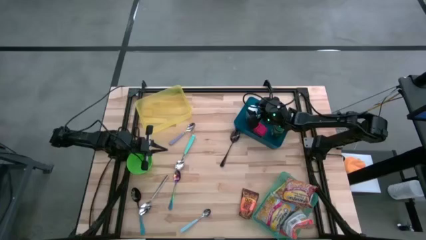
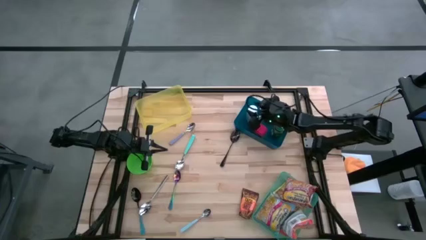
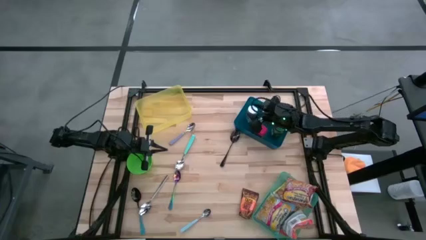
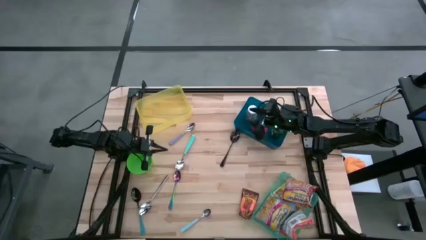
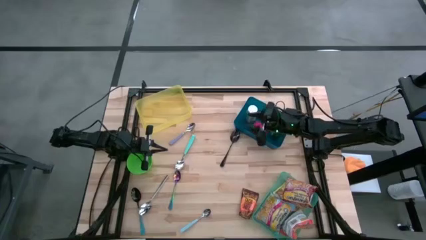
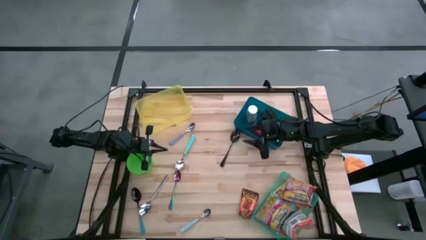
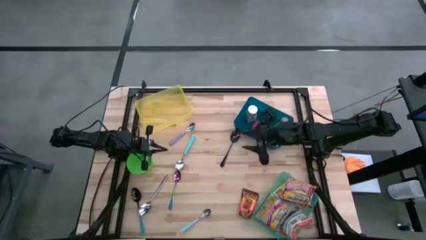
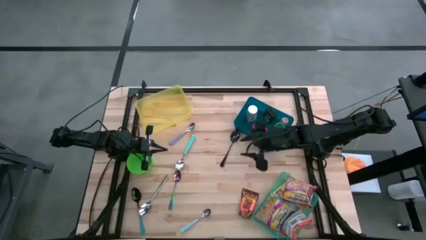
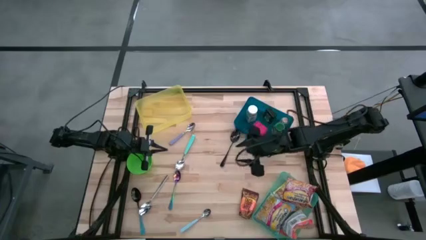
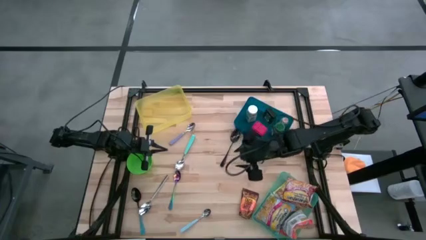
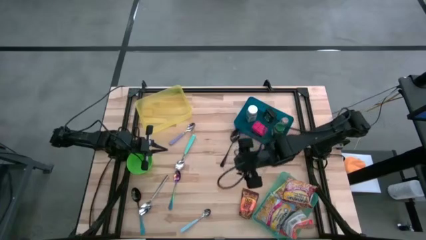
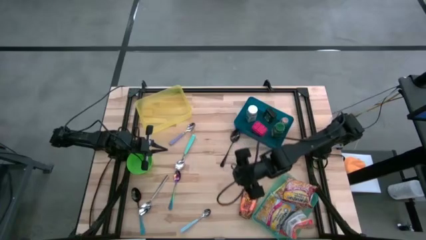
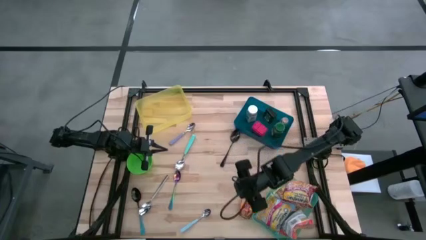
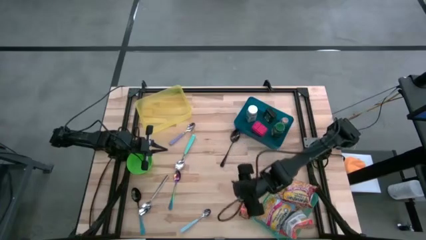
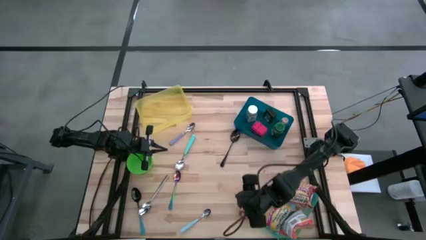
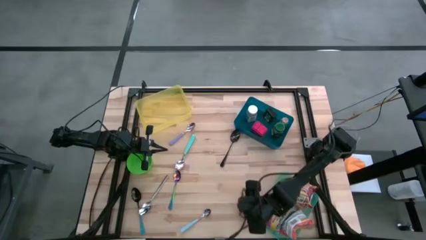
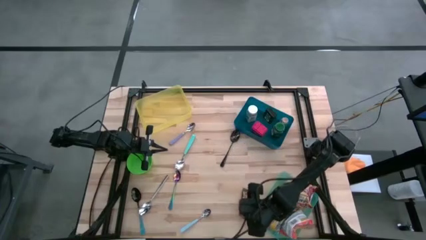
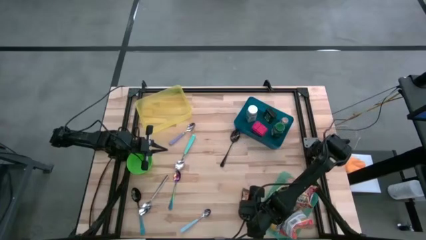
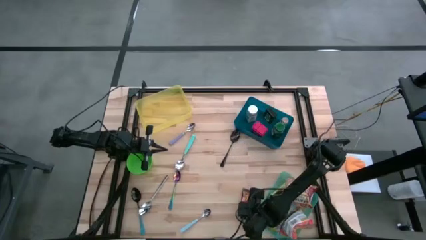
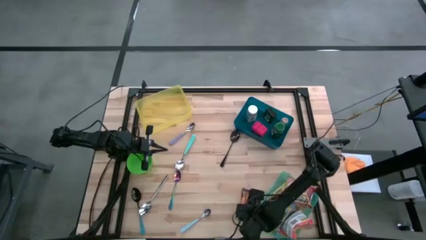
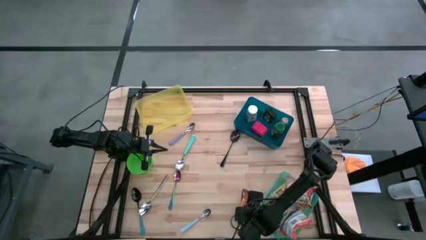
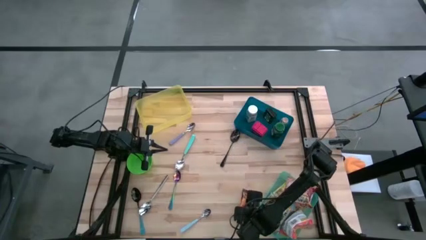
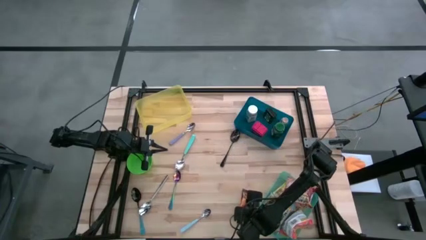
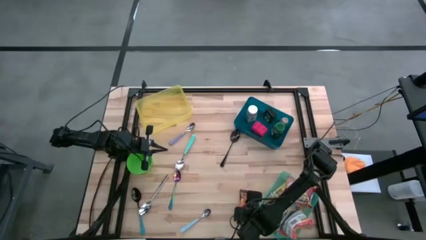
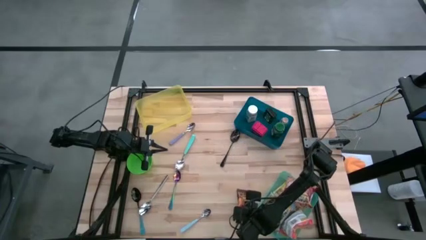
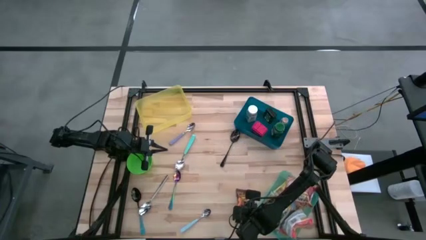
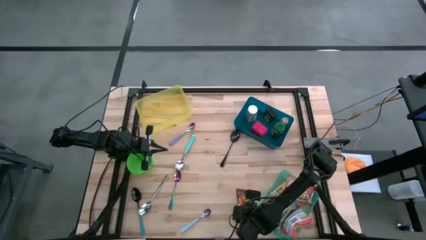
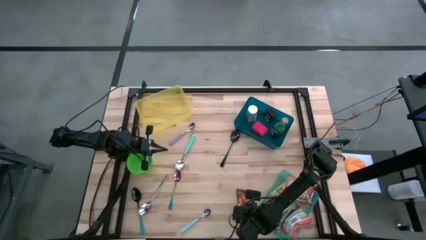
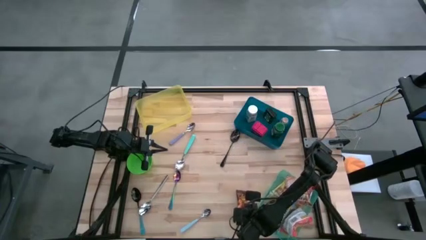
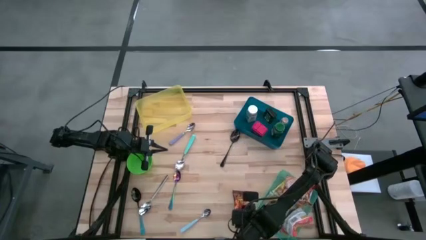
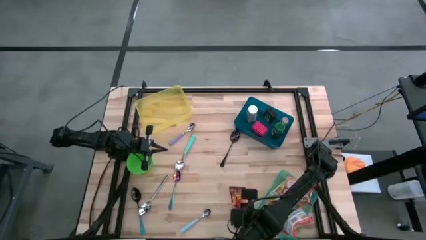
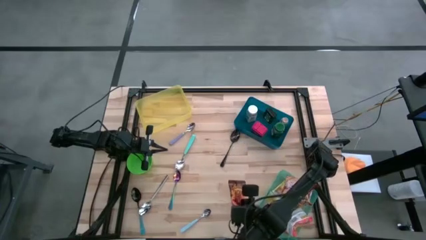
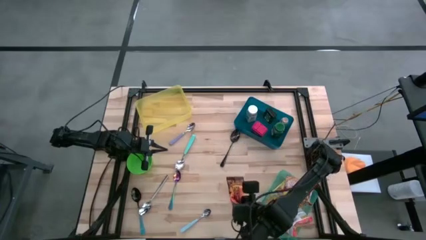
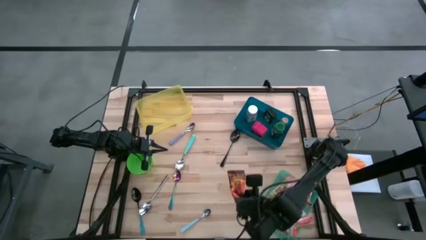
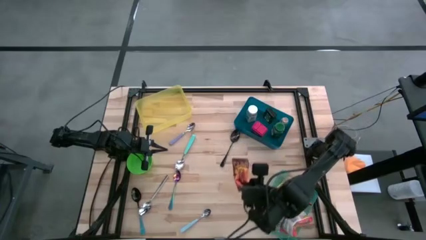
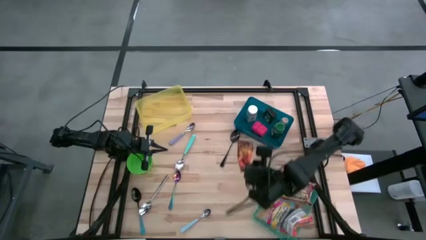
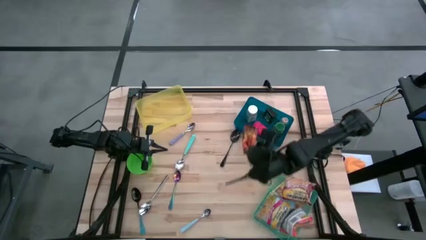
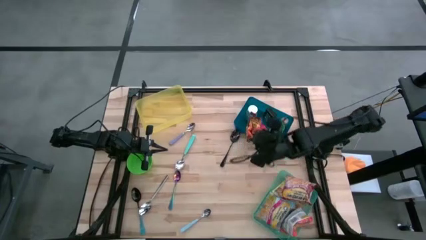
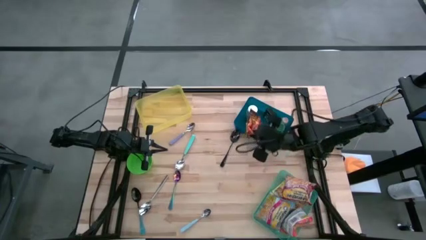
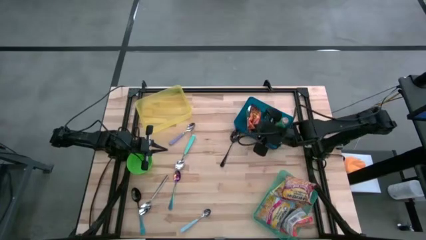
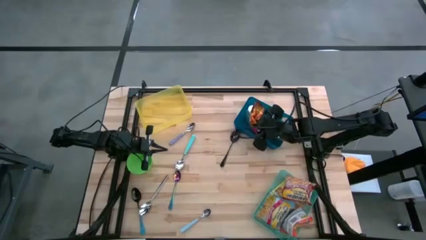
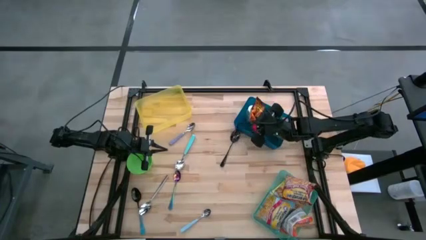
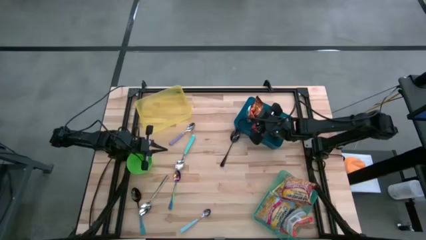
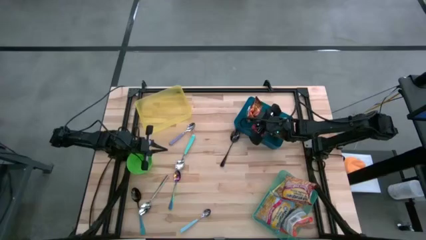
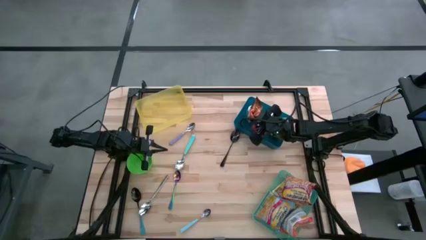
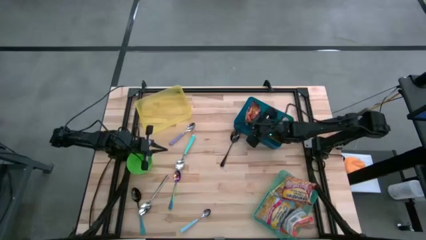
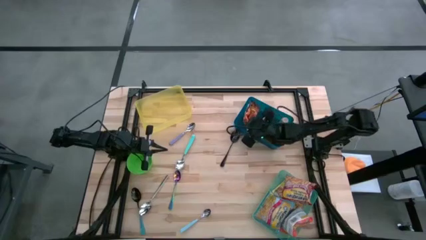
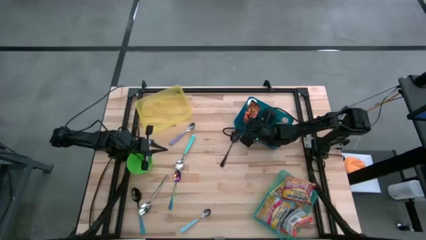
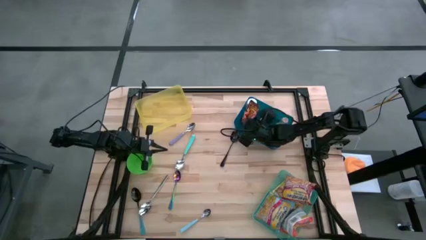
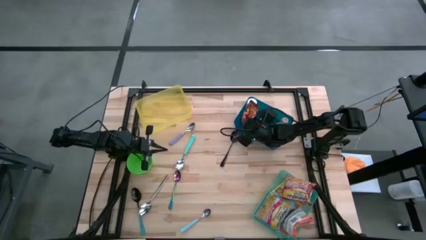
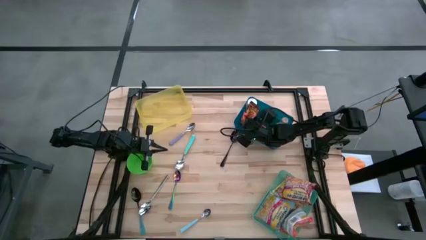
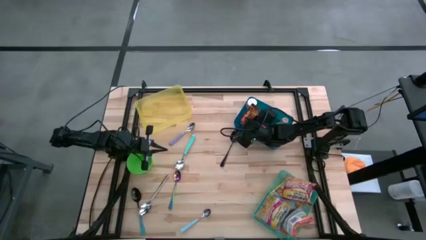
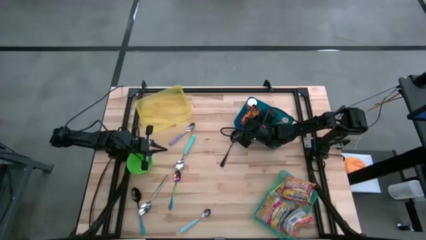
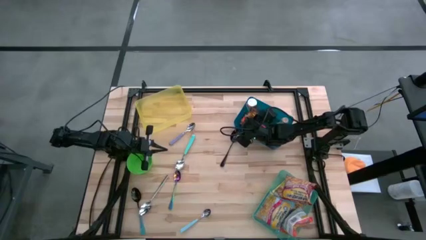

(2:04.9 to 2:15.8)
Put the orange seasoning bag into the blue bin
